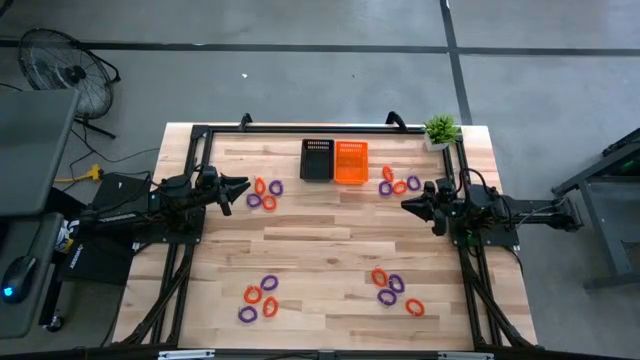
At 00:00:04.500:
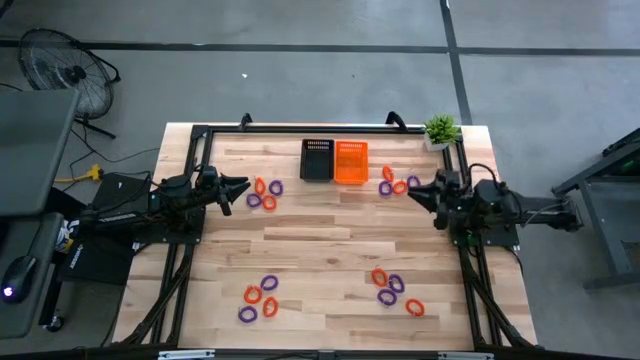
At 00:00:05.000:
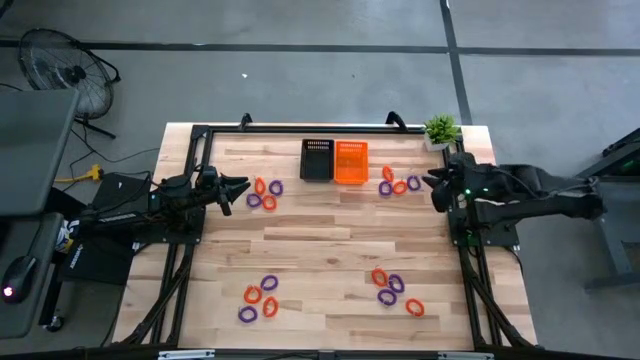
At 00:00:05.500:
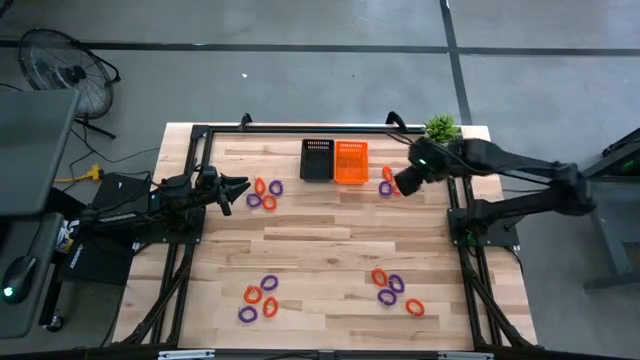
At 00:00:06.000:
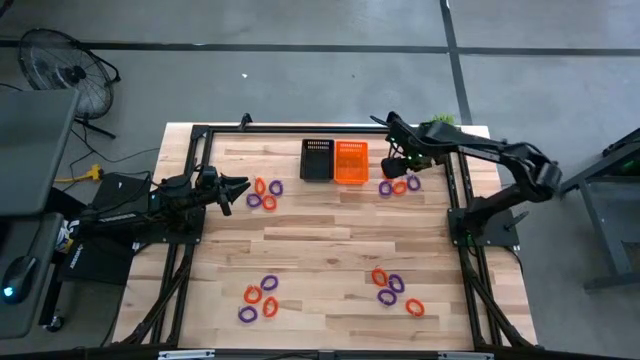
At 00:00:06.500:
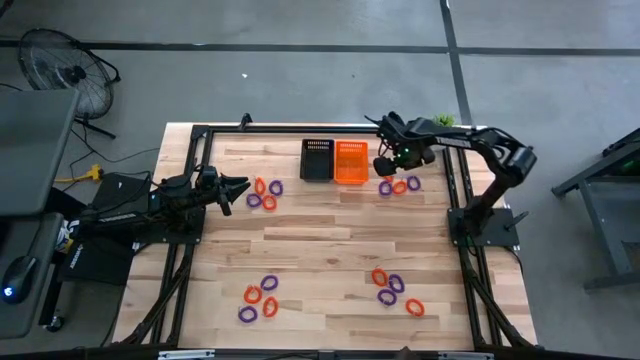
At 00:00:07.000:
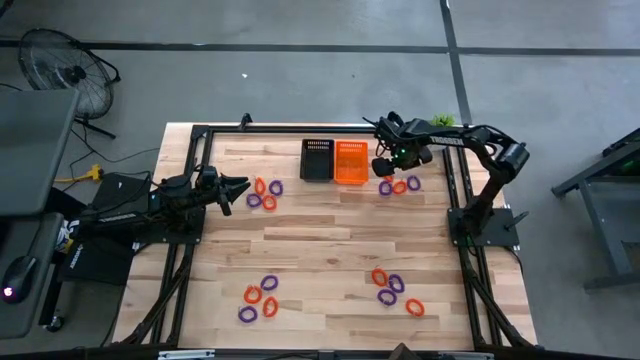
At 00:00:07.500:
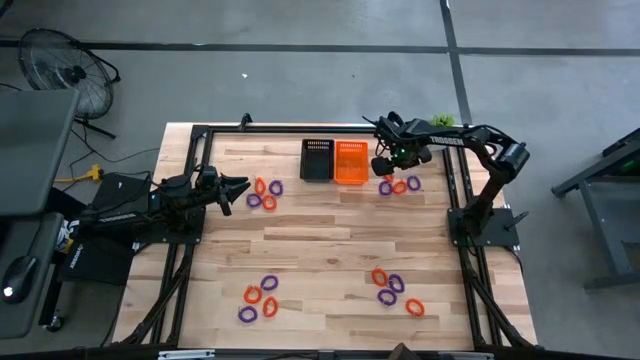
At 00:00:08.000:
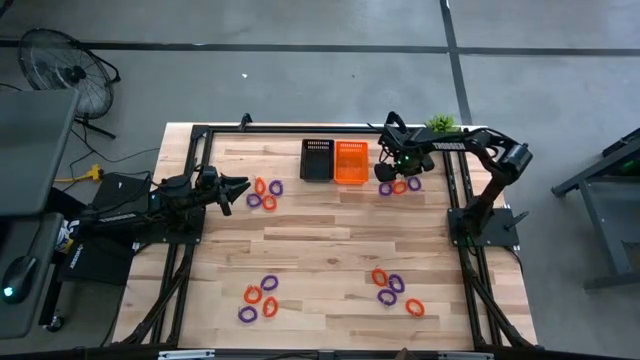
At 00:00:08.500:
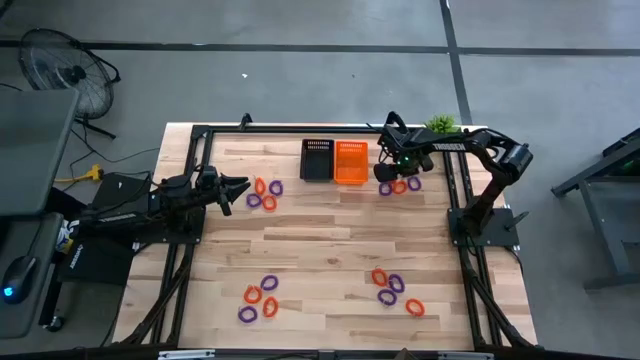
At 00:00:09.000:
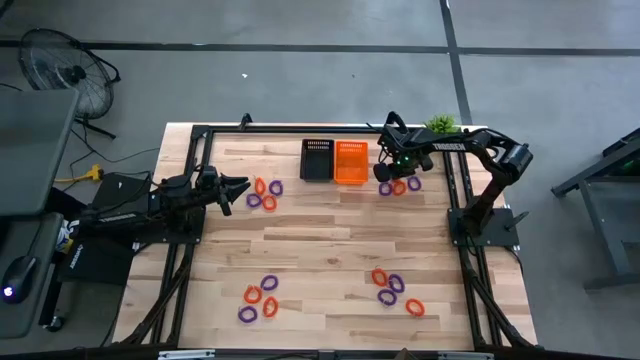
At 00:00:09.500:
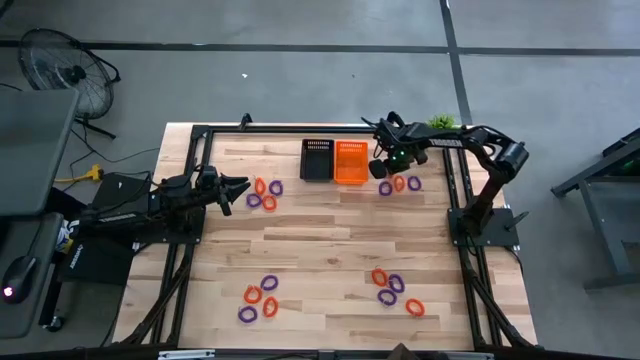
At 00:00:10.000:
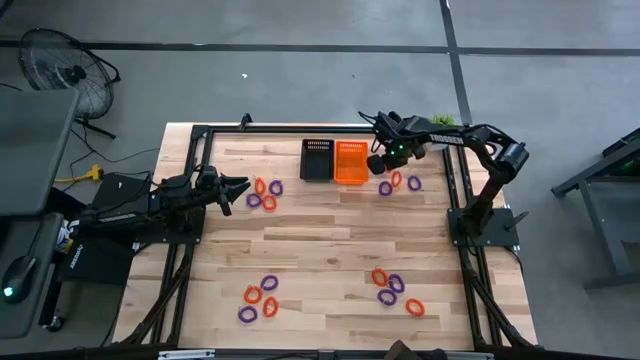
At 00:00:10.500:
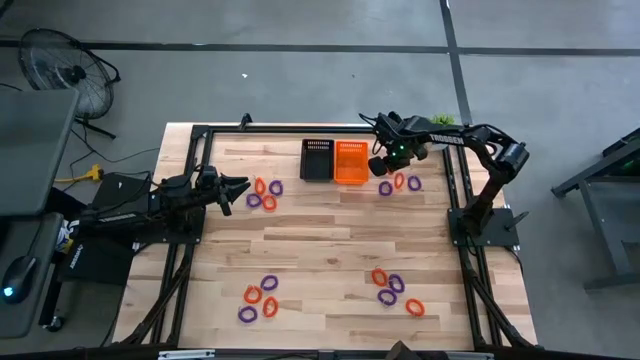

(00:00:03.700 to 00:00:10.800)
Task: Sort spring keychains
Put the orange spring keychain in the orange bin

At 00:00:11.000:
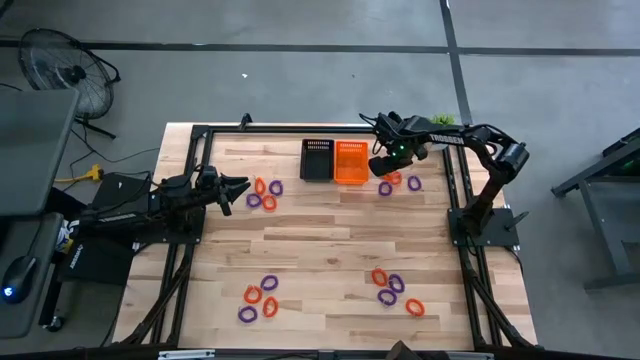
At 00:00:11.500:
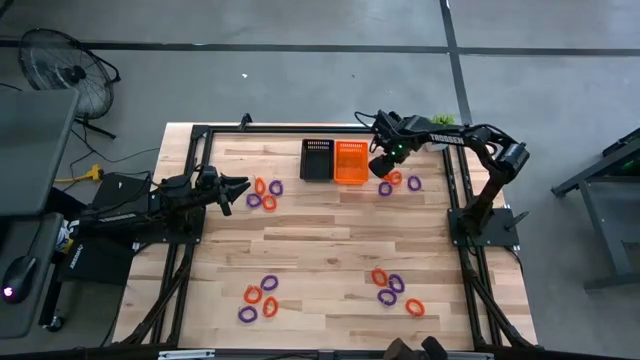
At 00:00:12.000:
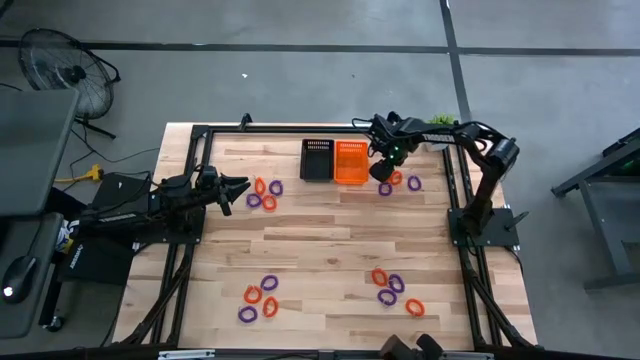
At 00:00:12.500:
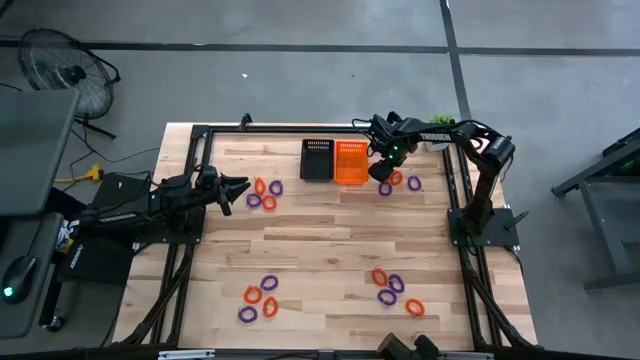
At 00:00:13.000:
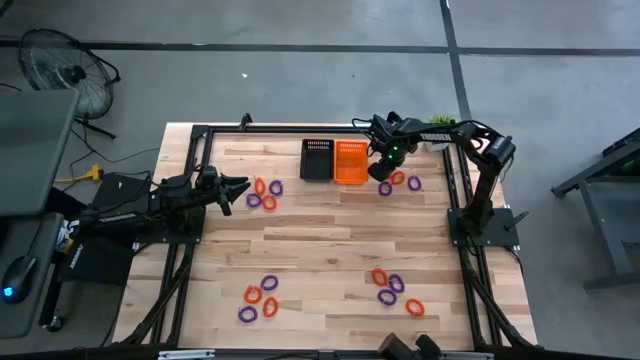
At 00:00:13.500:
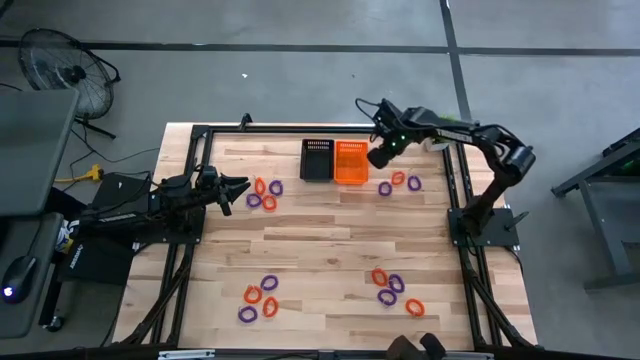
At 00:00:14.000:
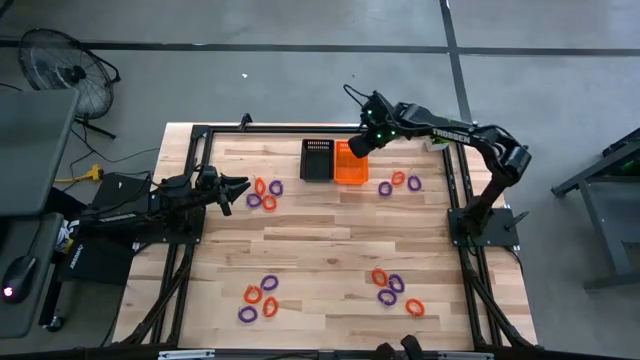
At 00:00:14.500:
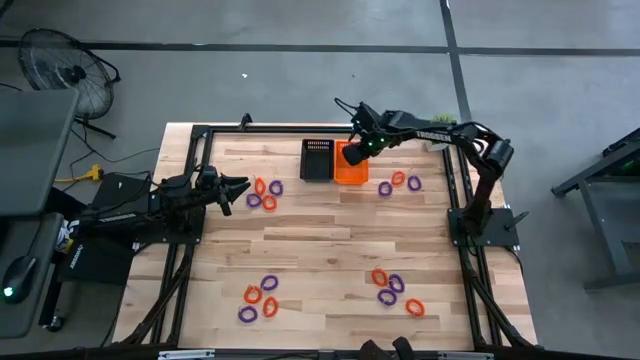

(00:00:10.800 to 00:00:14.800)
Put the orange spring keychain in the orange bin

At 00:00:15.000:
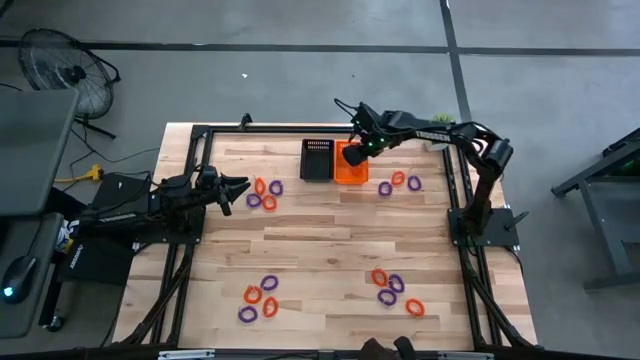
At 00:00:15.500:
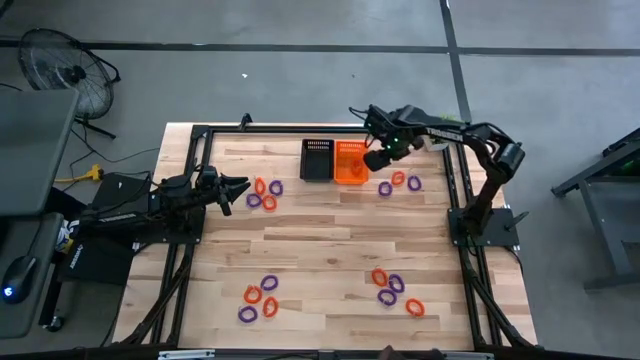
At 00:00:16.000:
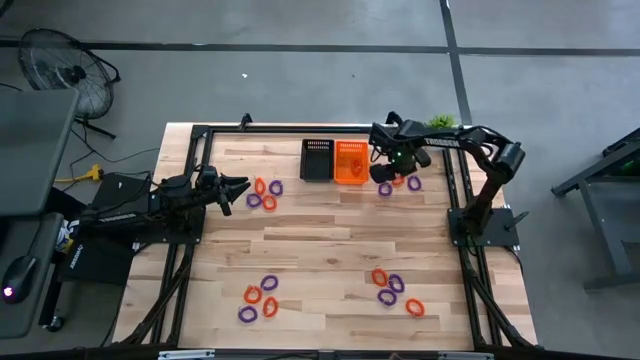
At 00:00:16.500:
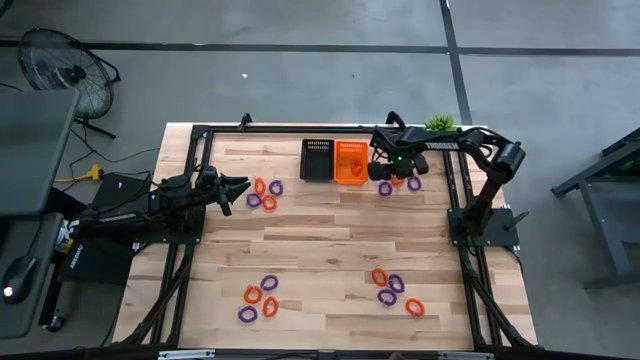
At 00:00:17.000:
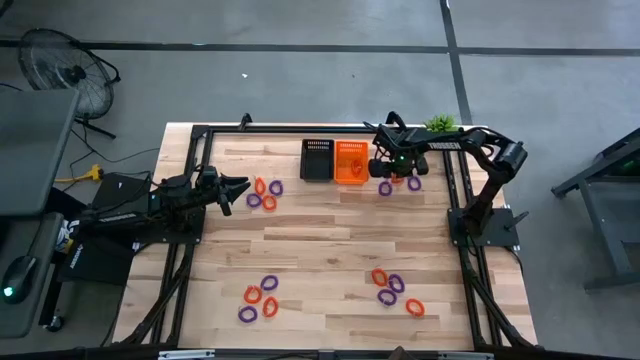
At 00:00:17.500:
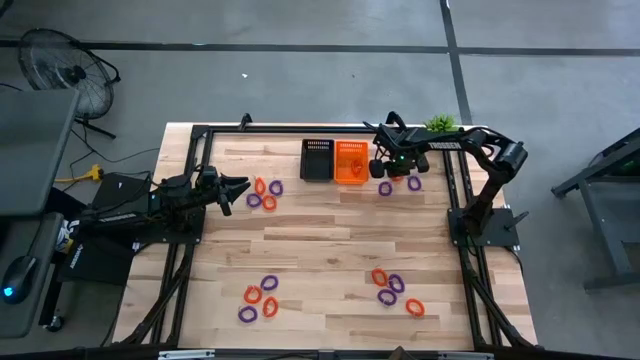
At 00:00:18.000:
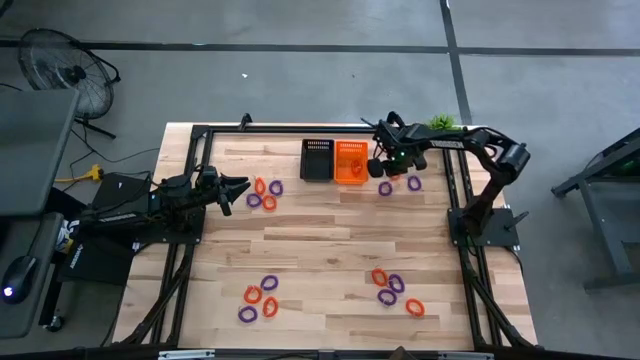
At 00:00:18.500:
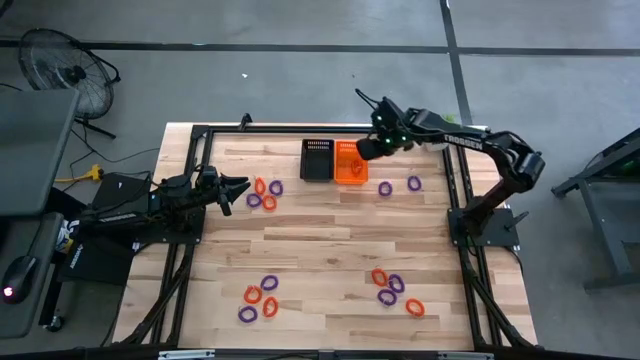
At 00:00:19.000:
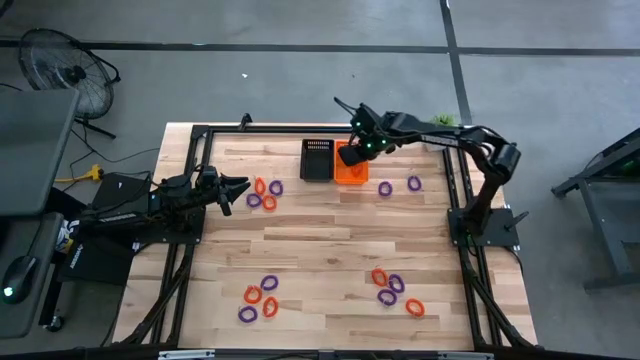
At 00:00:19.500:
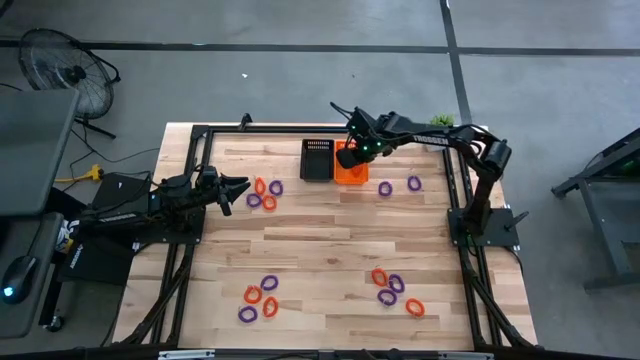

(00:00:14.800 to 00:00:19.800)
Put the orange spring keychain in the orange bin

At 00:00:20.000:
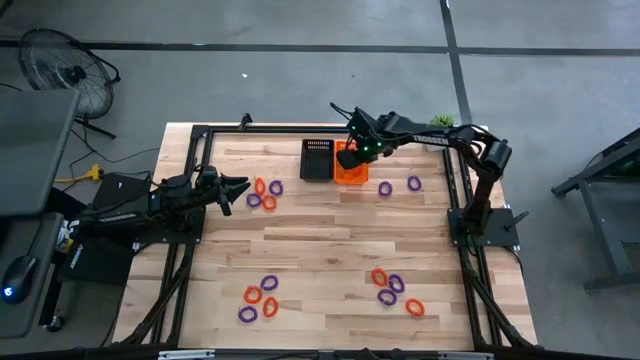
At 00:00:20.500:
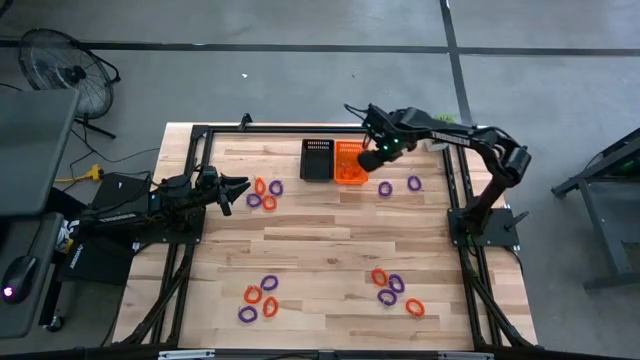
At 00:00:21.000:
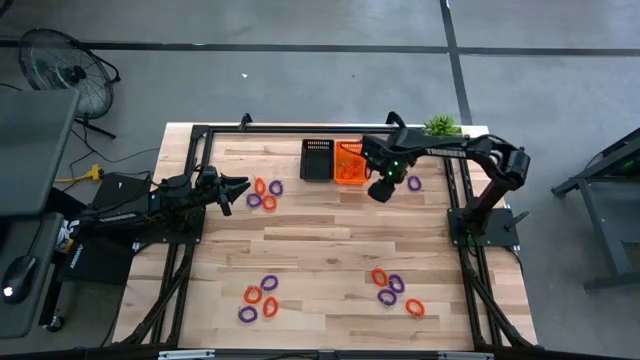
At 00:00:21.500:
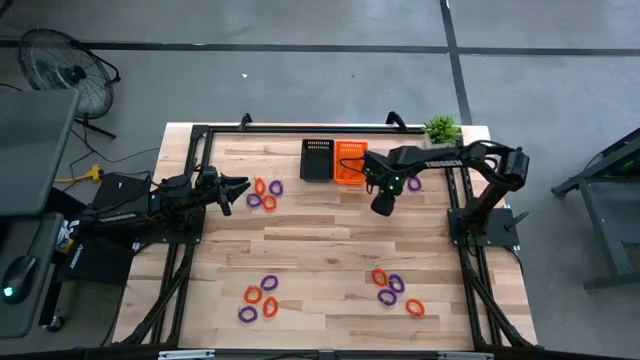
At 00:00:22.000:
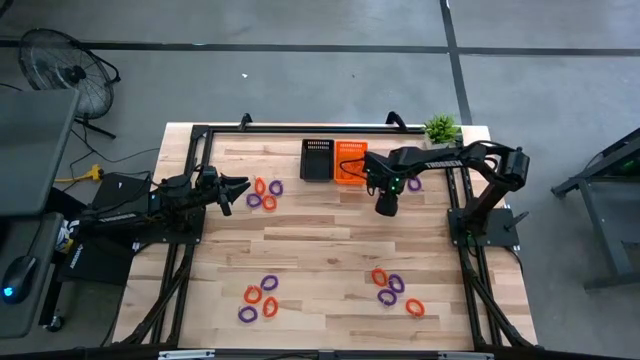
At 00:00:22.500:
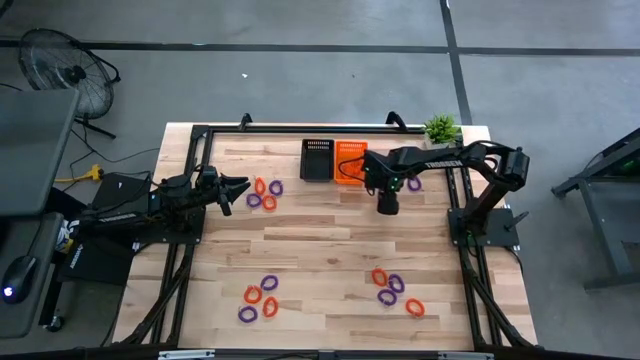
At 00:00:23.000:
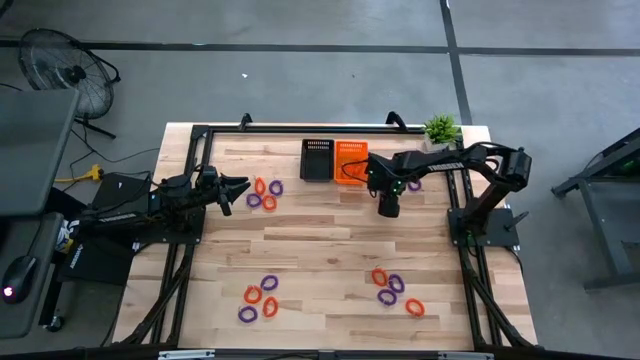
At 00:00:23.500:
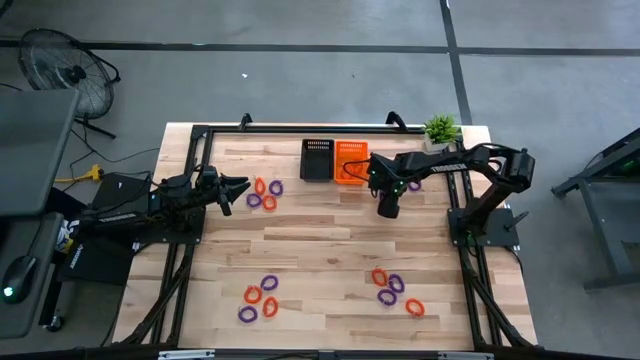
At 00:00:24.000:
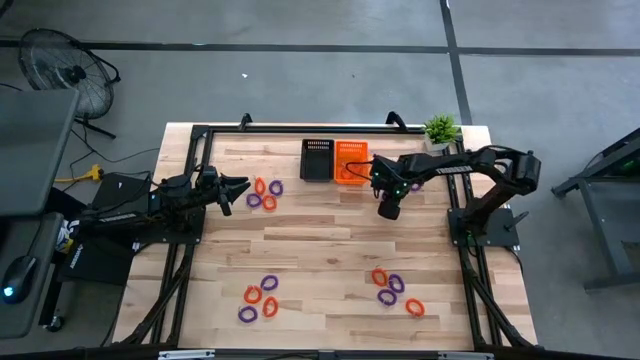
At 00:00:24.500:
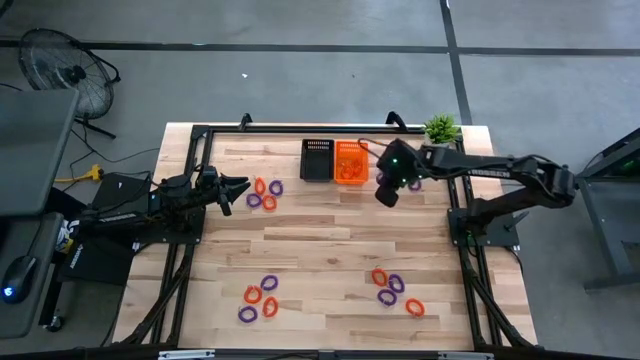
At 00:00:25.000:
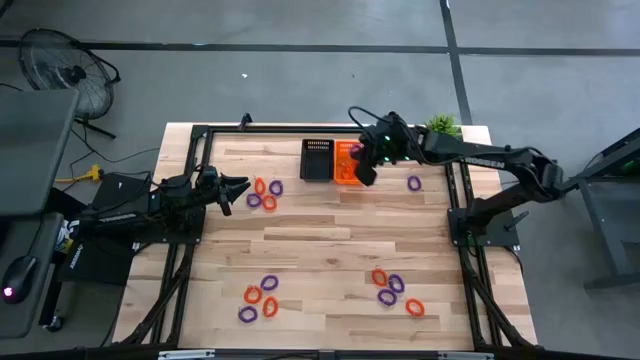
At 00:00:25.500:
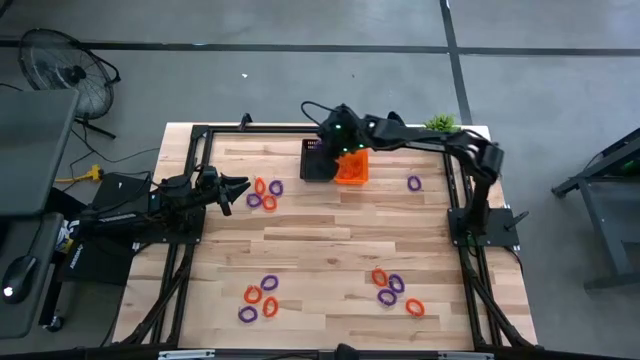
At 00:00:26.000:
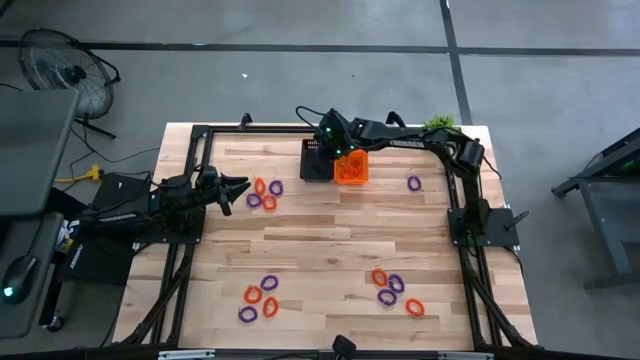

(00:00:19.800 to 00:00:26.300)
Put the purple spring keychain in the black bin
